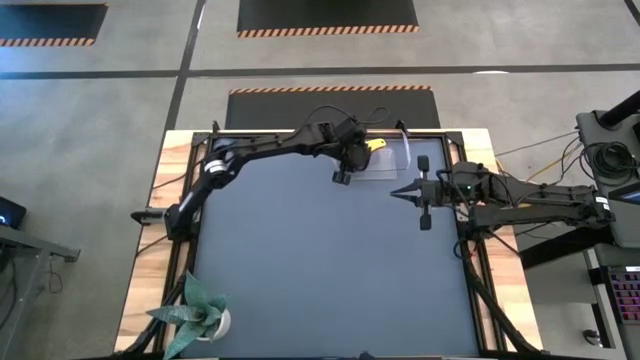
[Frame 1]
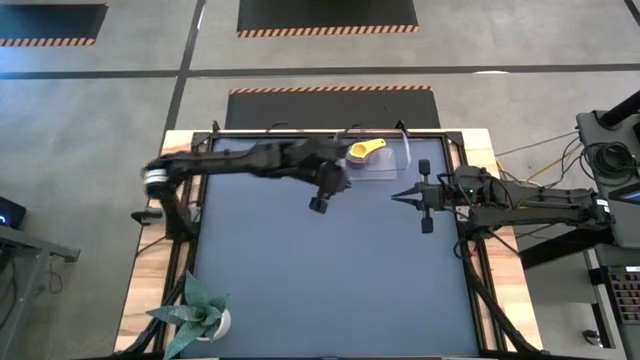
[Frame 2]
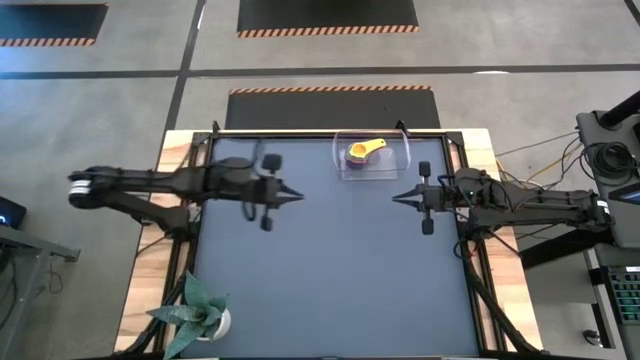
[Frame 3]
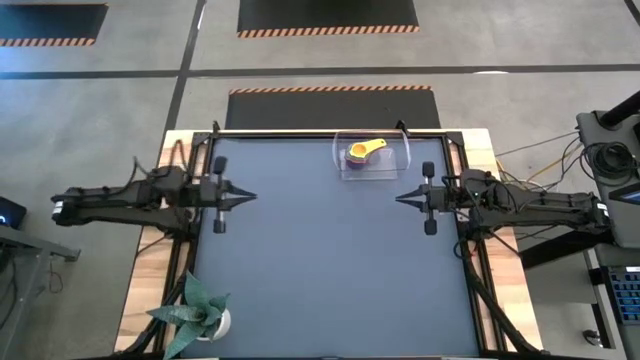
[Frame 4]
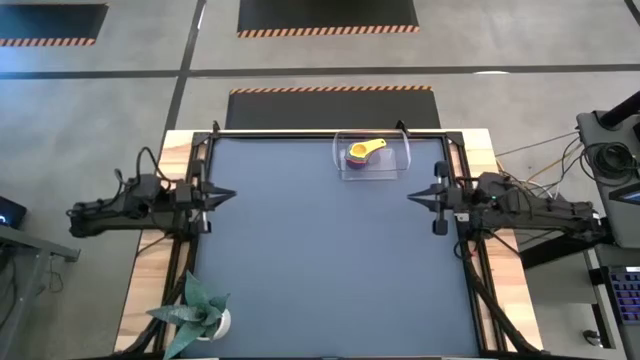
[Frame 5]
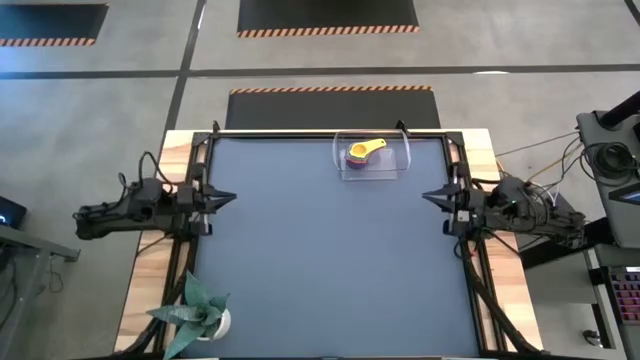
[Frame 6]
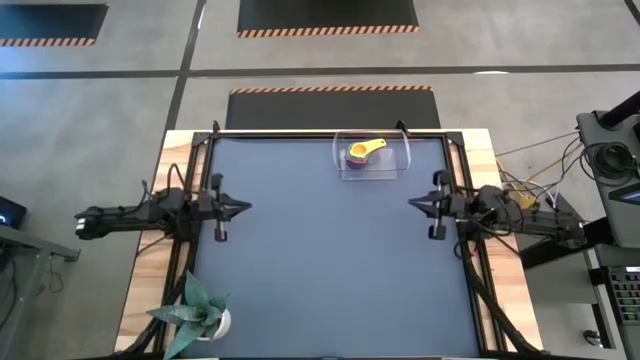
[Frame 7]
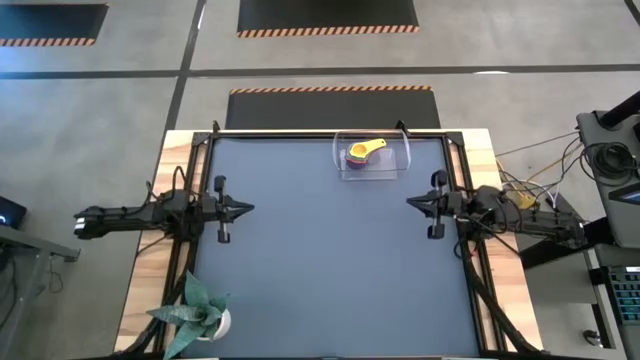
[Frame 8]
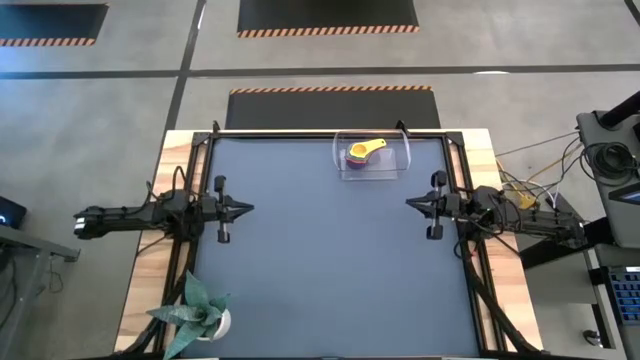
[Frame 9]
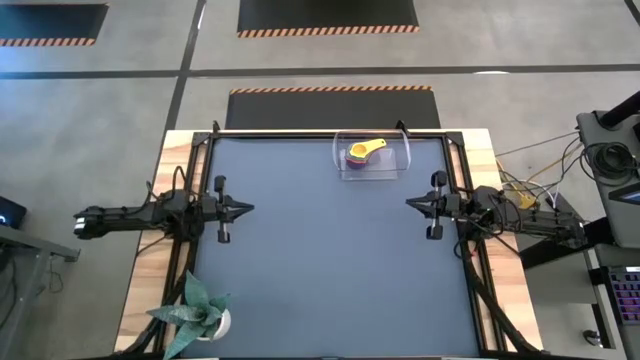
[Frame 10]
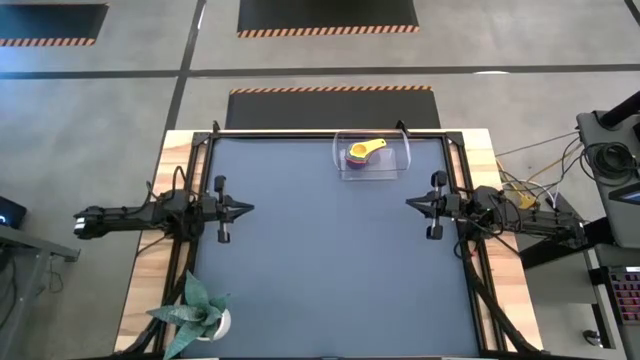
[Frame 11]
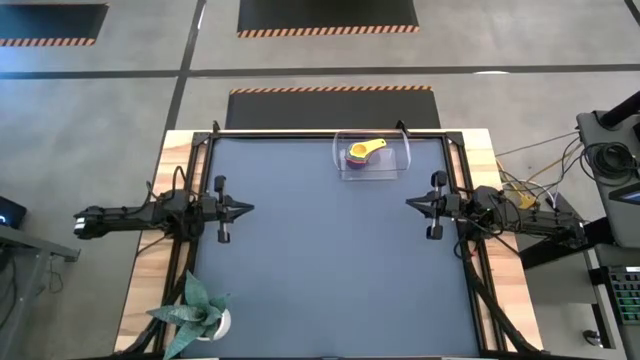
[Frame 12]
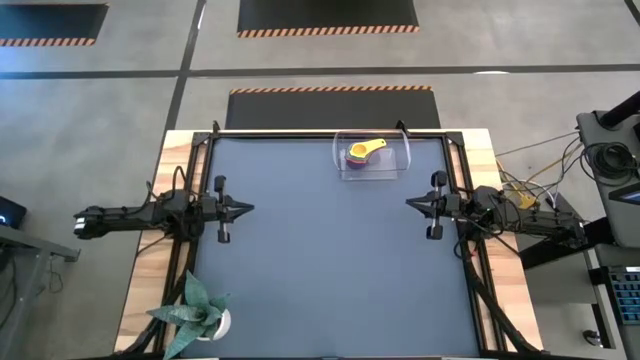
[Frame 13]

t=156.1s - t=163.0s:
Task: Nest measuring cups in basket
Return to Home Position

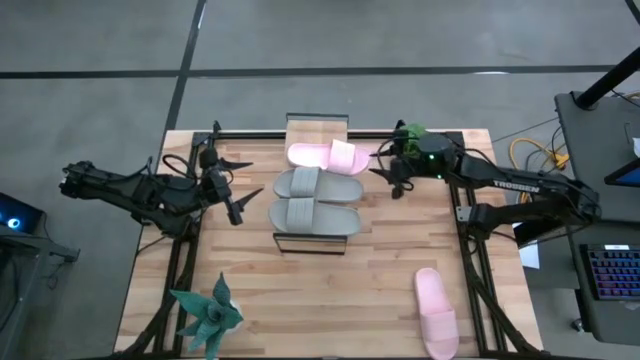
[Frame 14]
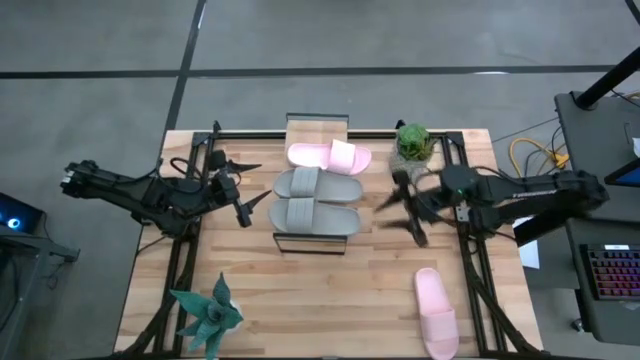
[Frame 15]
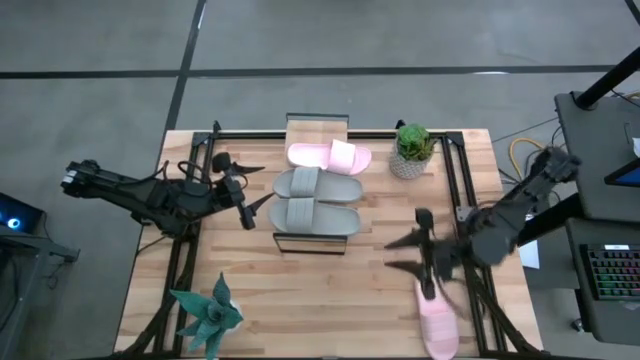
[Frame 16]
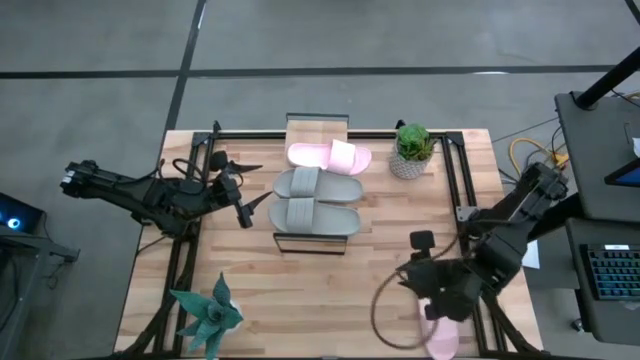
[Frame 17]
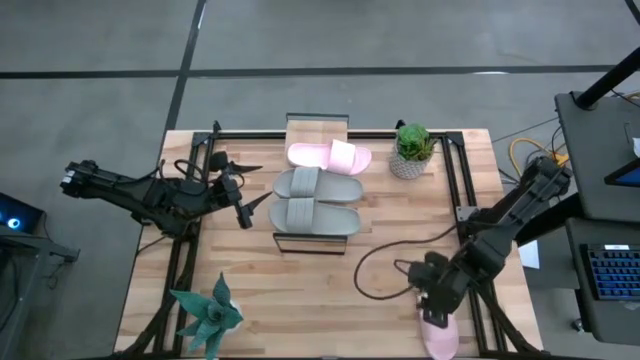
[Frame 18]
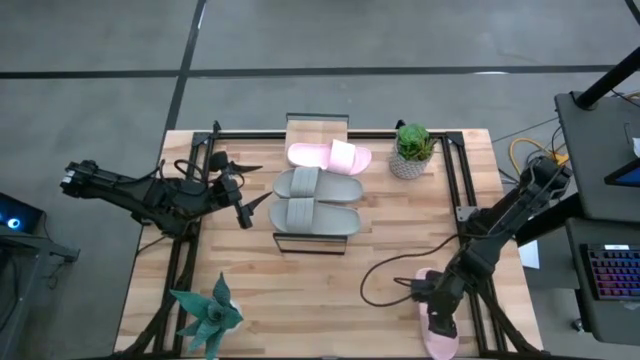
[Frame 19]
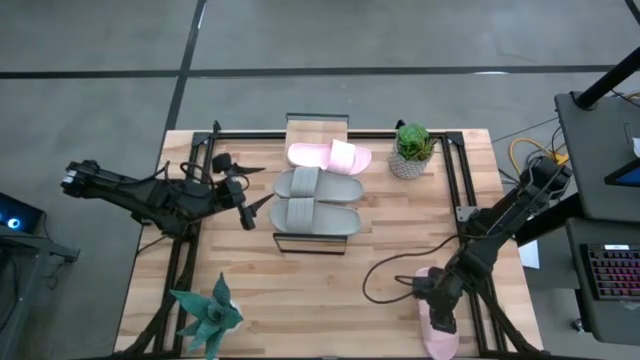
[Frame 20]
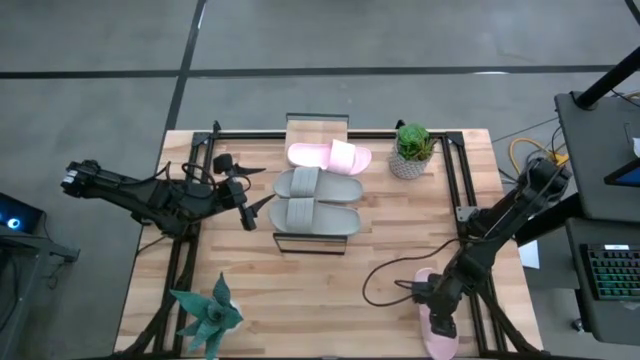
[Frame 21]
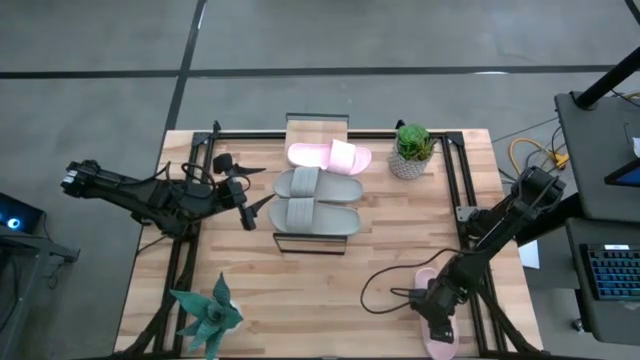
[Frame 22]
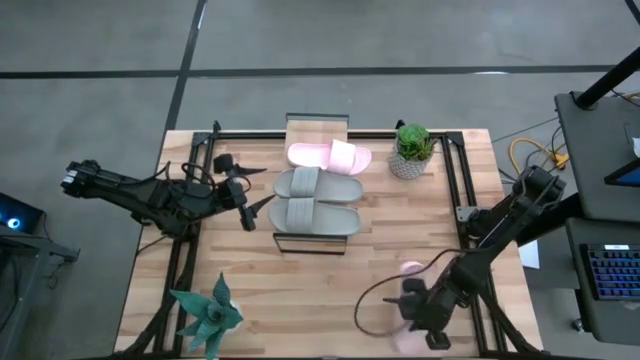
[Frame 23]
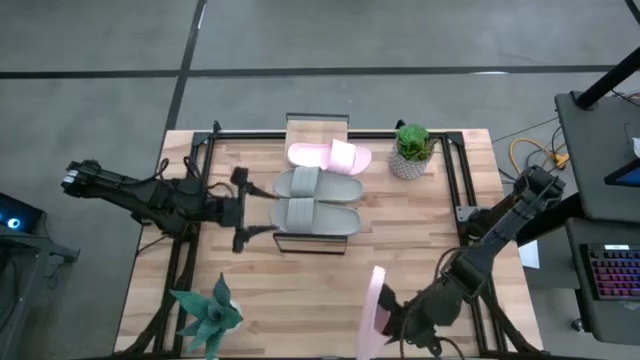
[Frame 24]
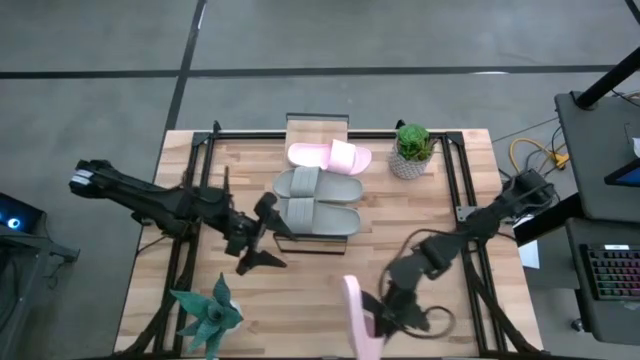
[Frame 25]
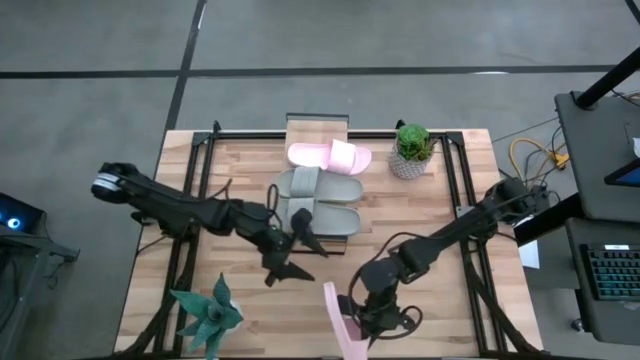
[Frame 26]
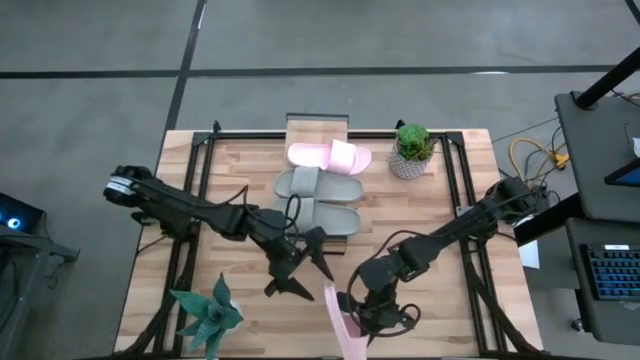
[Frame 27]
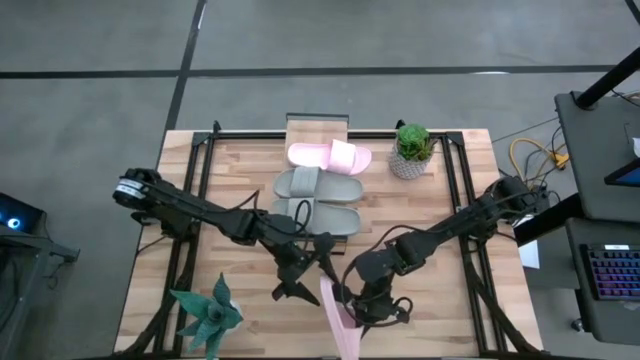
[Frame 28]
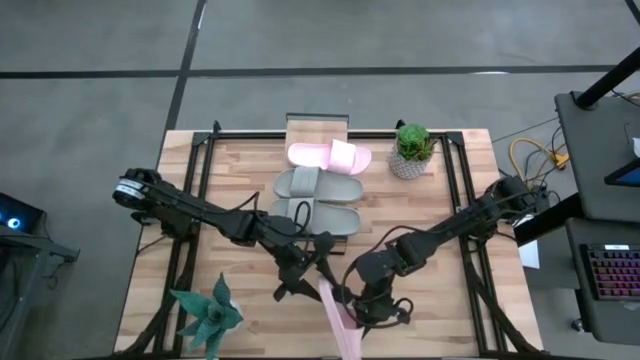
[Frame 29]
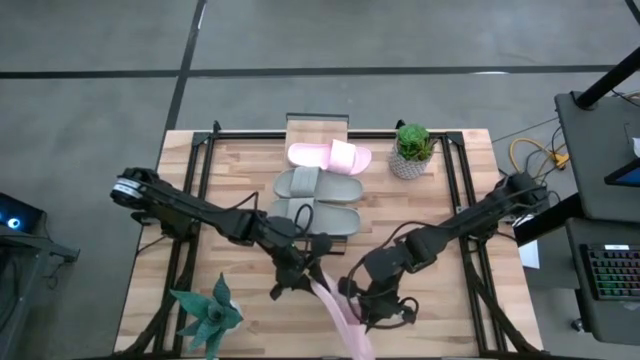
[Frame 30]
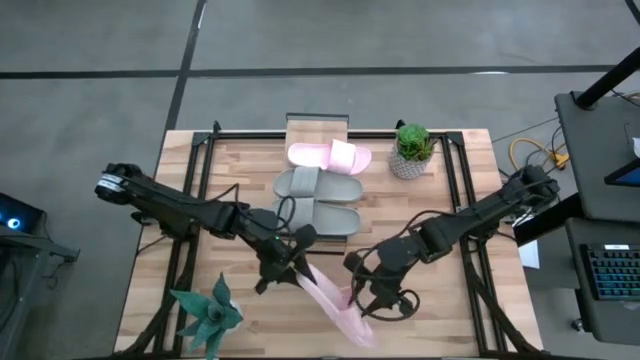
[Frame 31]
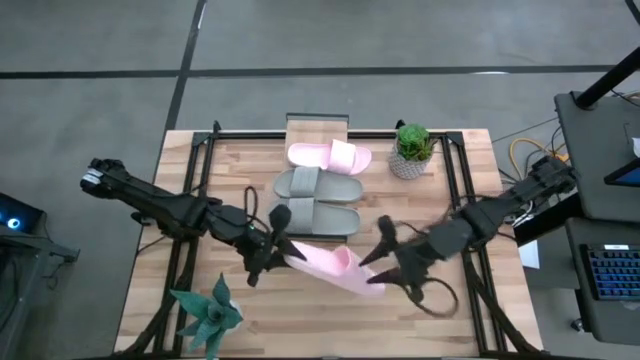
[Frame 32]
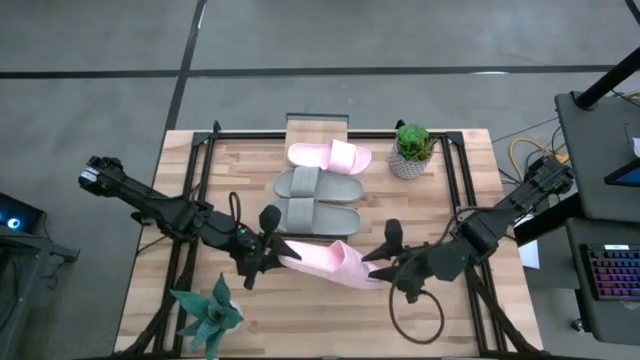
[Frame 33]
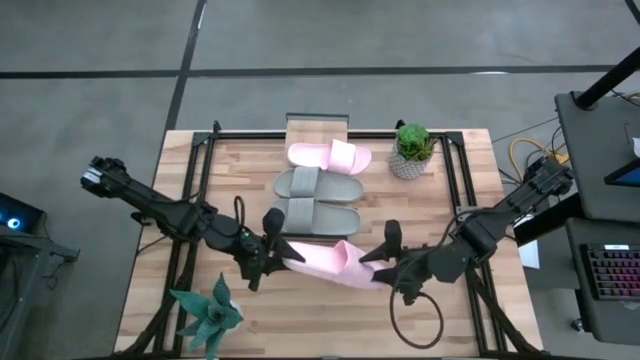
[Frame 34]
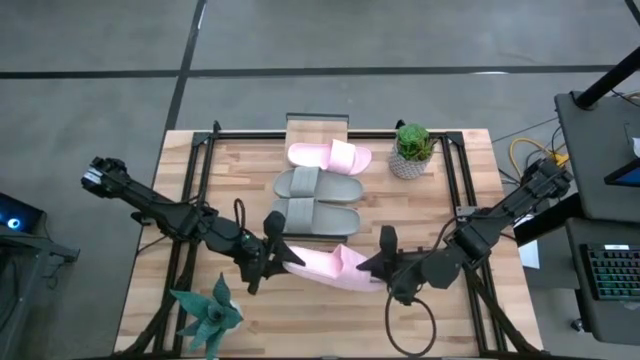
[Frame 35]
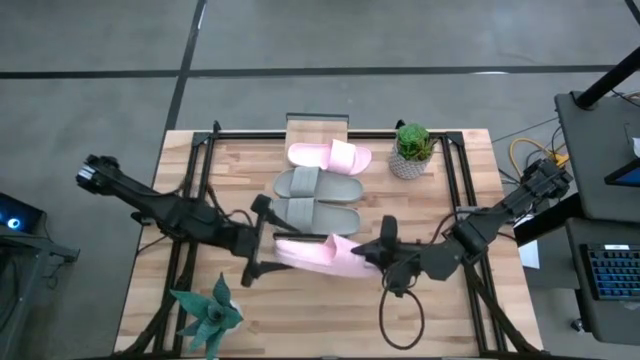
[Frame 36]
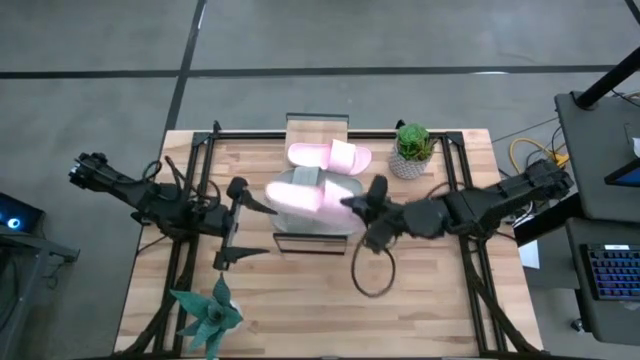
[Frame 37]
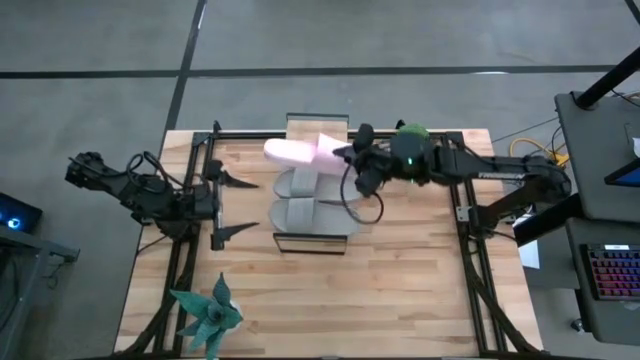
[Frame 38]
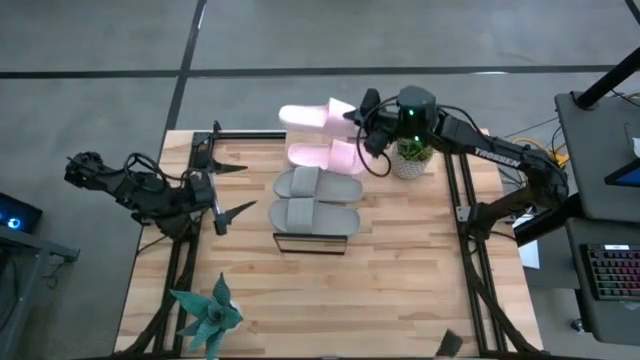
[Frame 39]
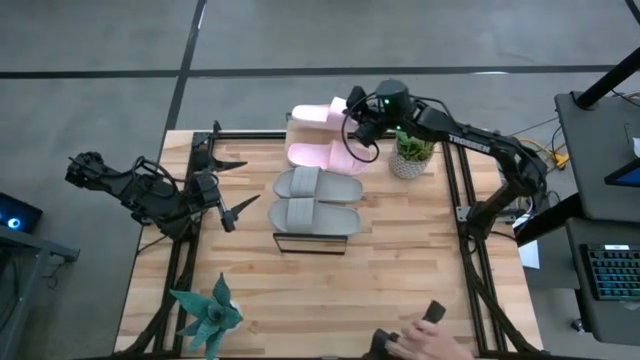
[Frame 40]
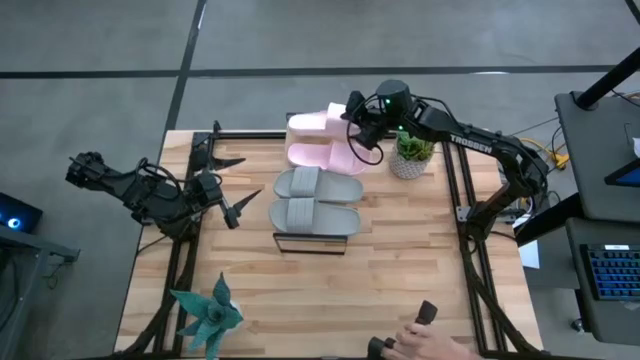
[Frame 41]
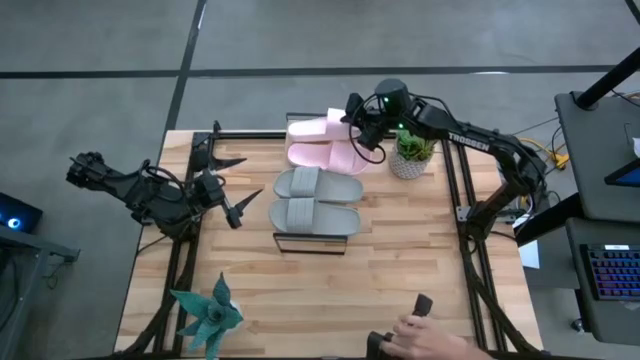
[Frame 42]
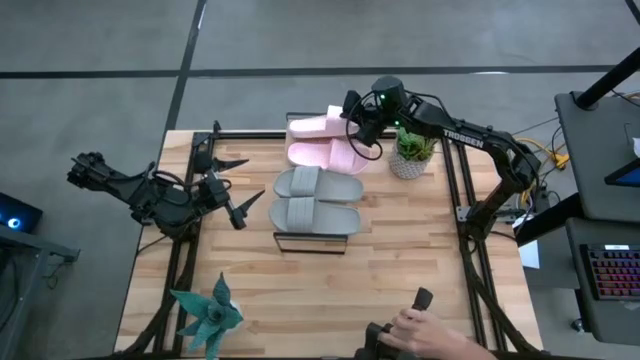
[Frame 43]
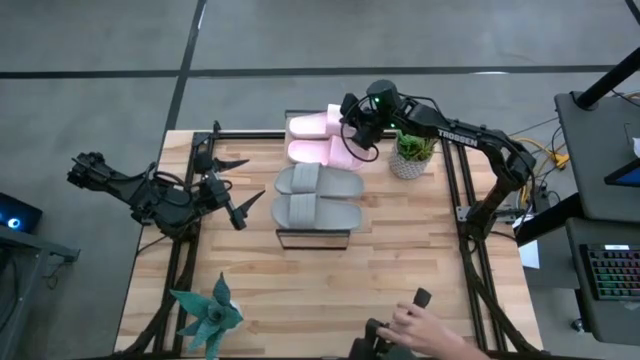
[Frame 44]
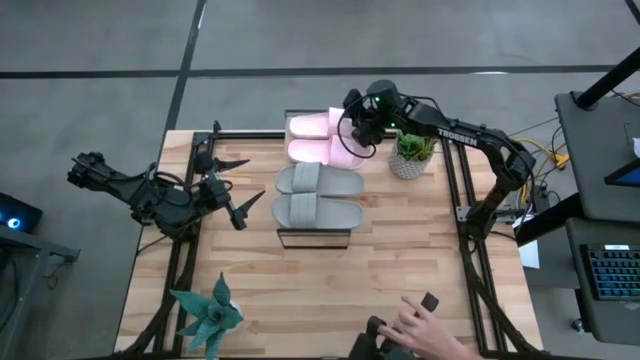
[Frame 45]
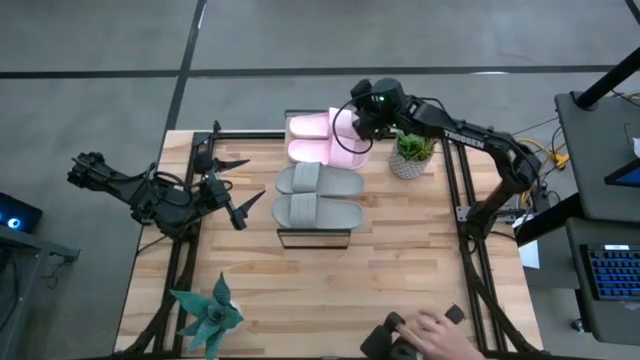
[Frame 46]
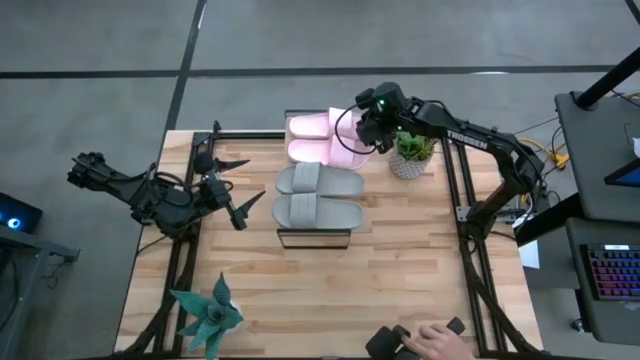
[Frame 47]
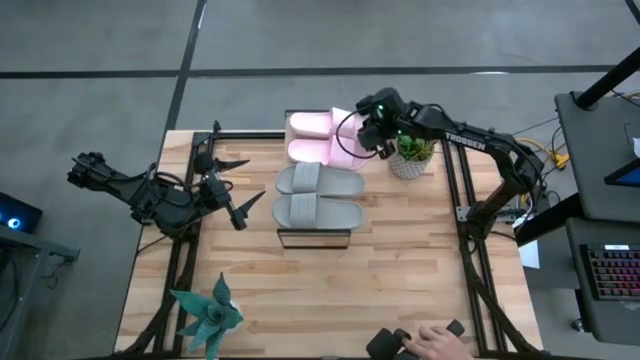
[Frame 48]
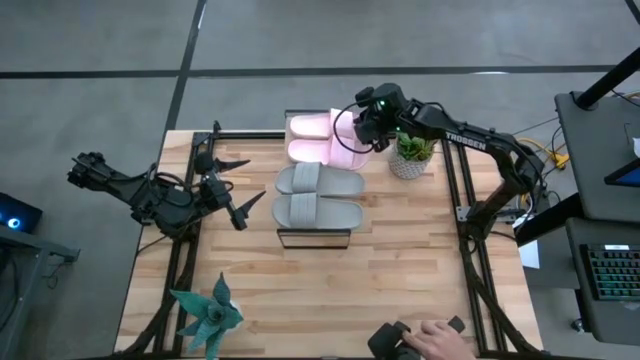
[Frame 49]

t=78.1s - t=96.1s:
Task: Pick and place slides into the shelf
Align the pink slide with the other pink slide on the shelf
